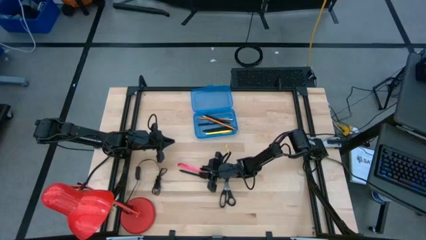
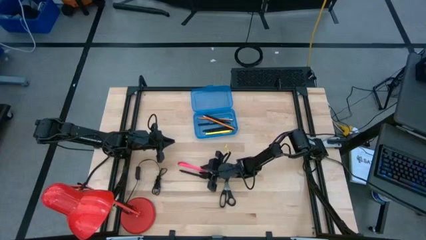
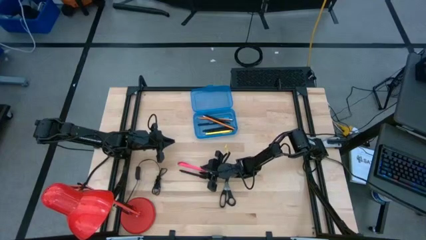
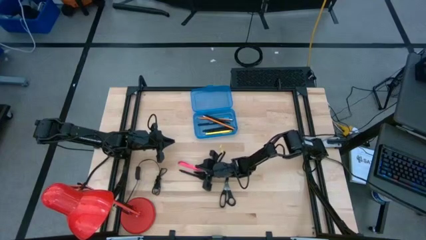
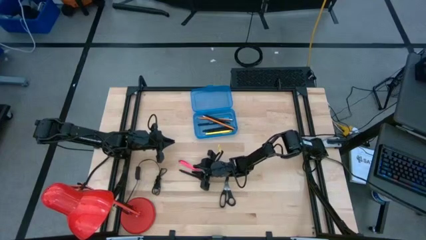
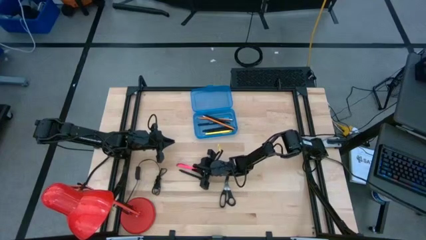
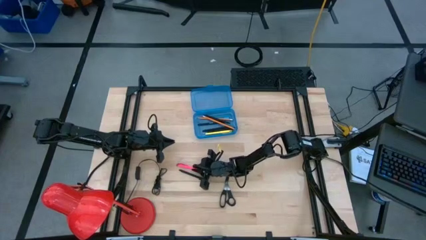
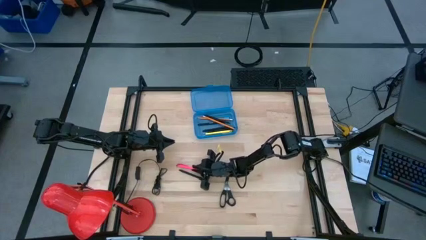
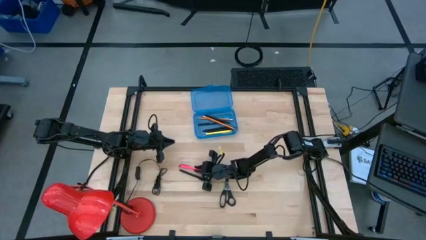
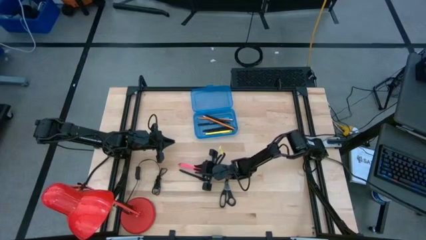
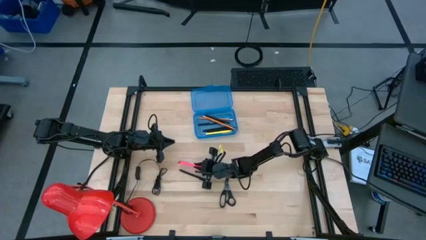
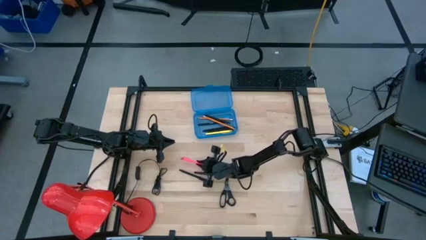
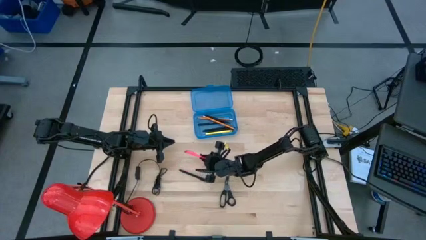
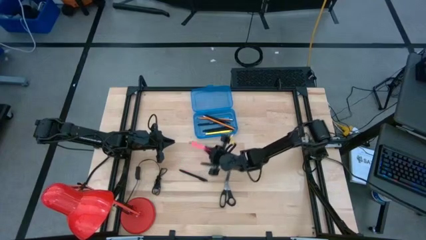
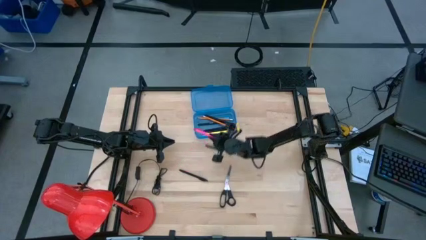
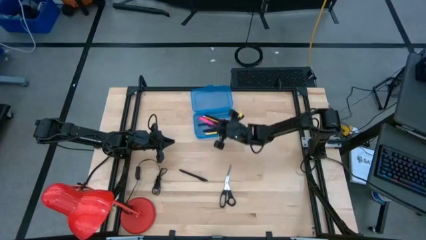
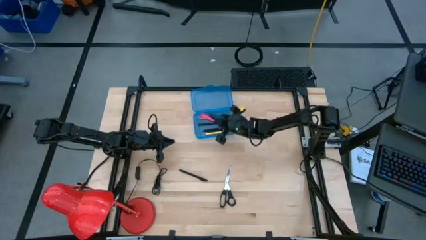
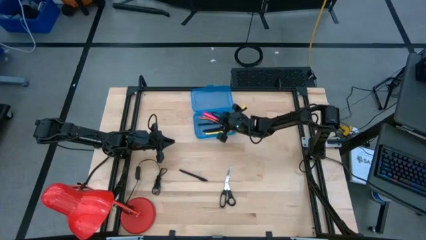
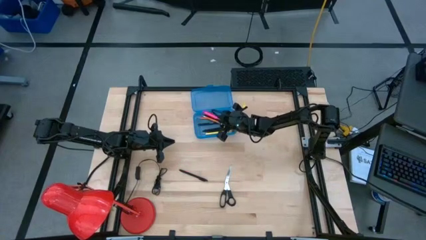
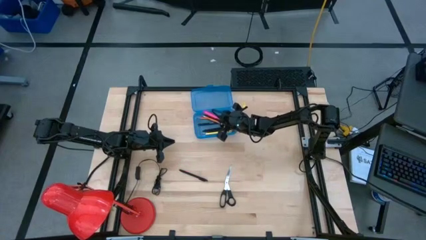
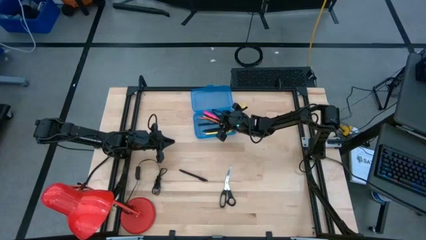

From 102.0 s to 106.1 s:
Task: Pick & place school supplies into a supply box
Put the pink pen into the blue supply box

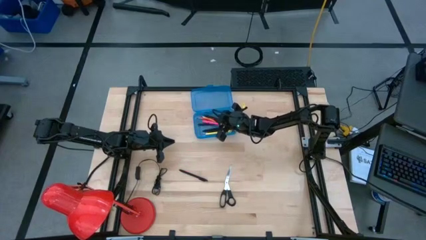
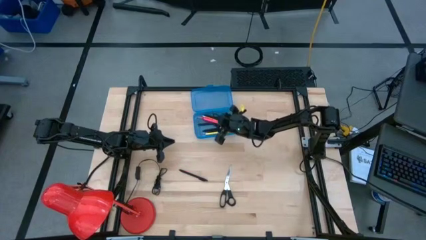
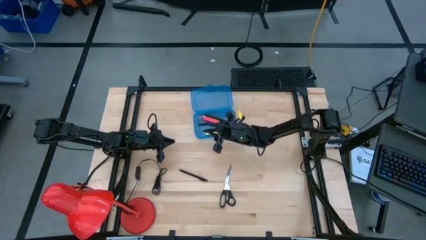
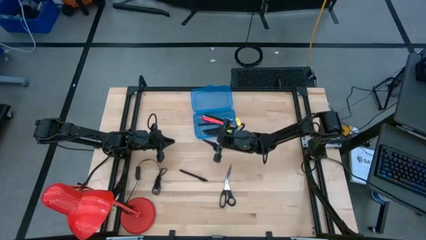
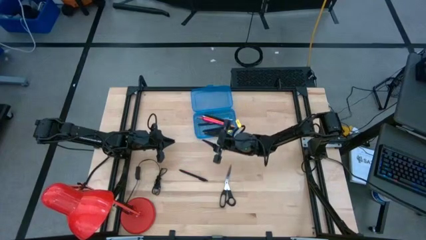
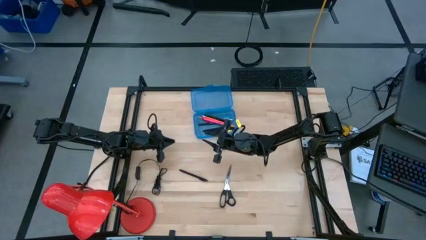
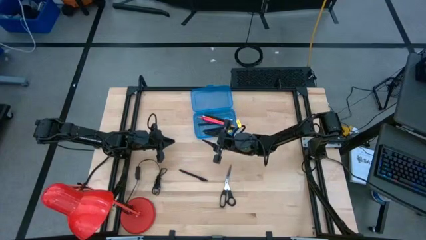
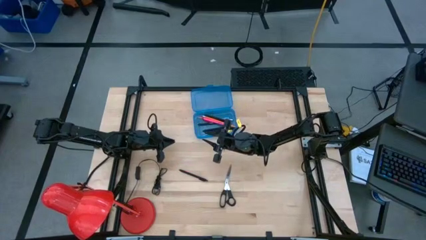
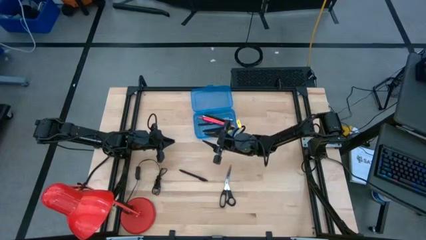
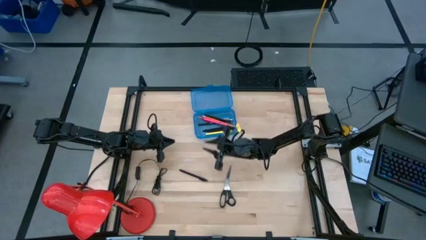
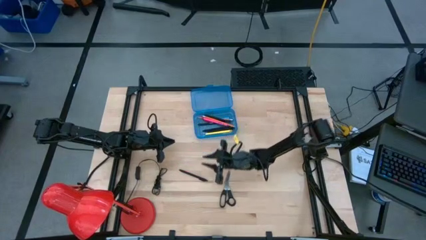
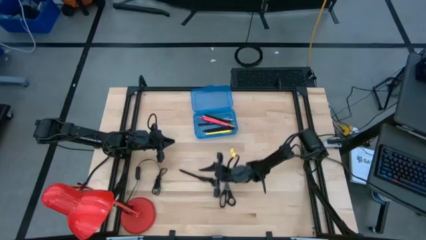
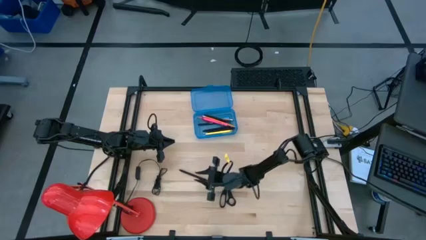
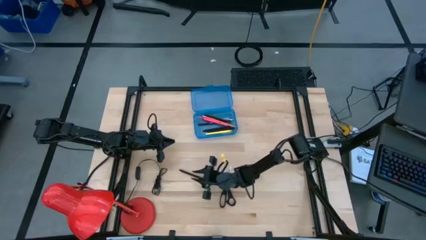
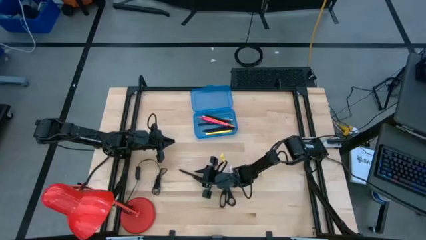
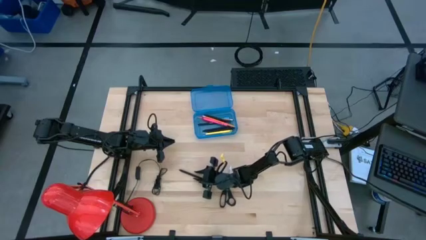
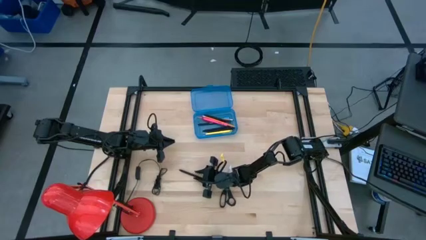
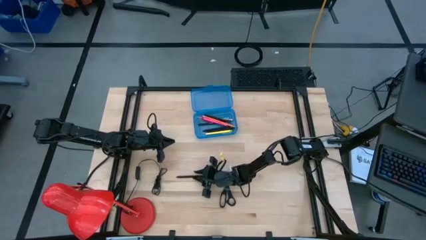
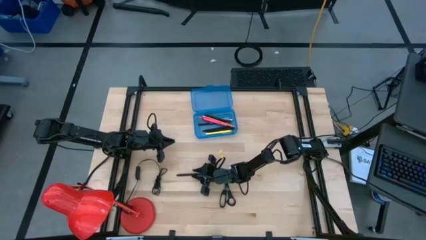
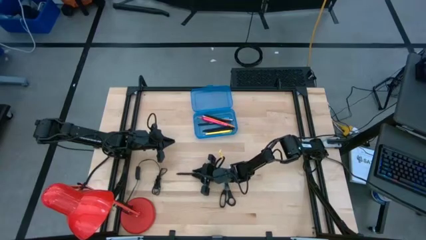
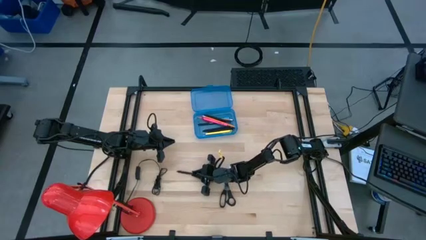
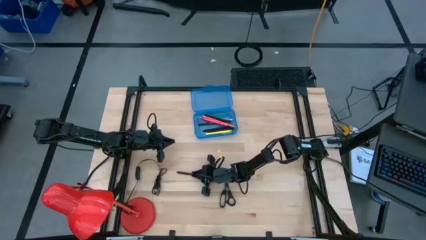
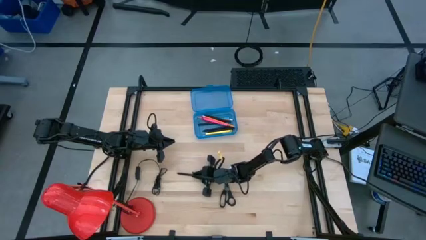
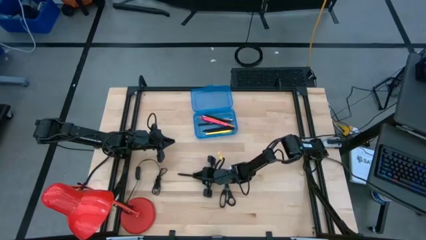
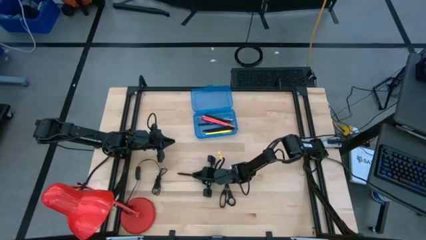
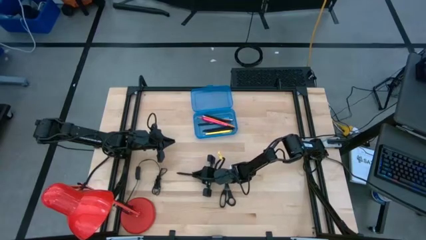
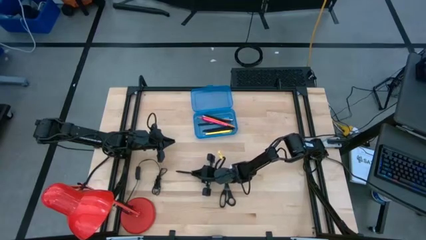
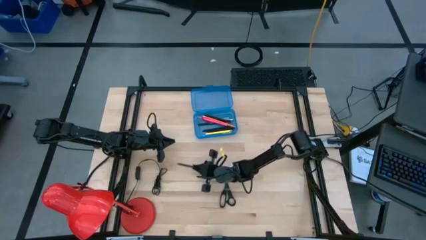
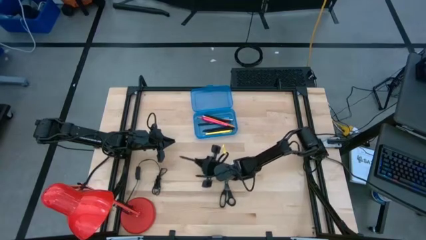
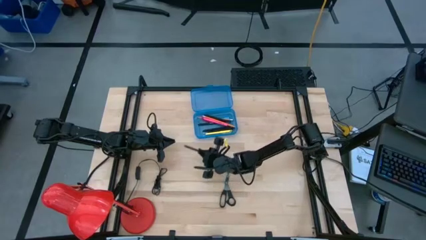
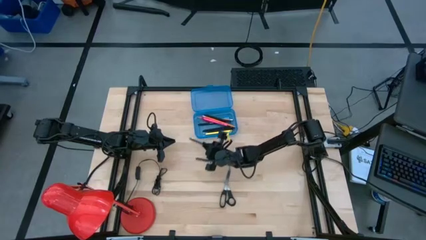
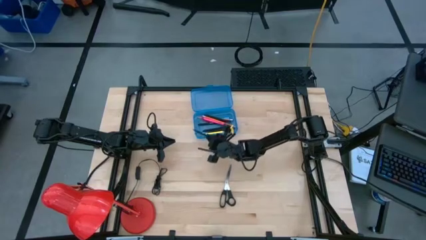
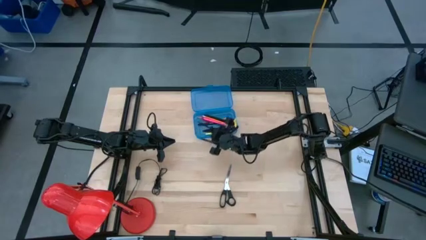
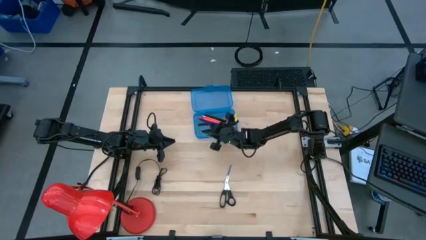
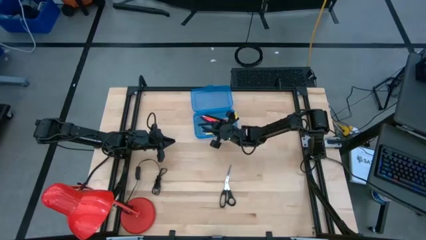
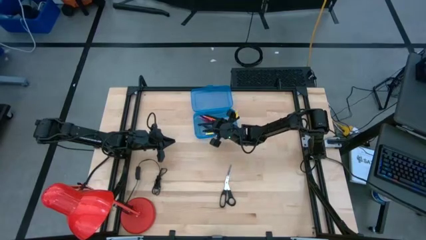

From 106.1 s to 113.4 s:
Put the black pen into the blue supply box

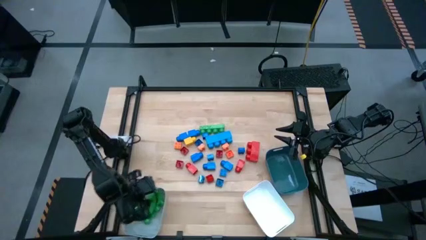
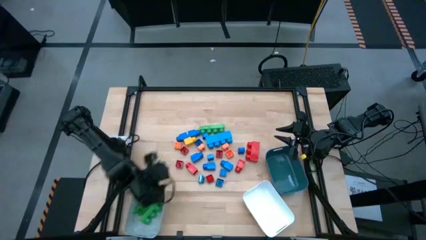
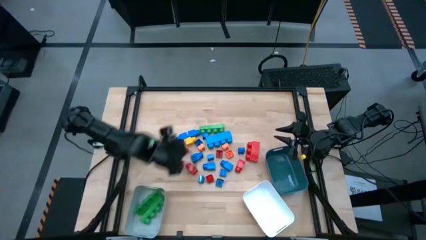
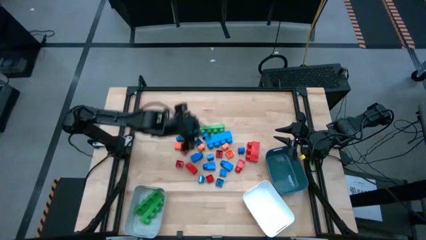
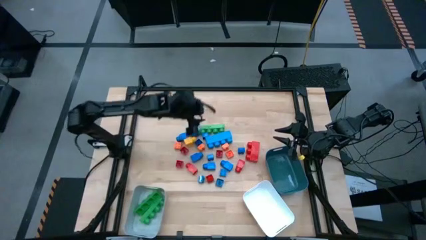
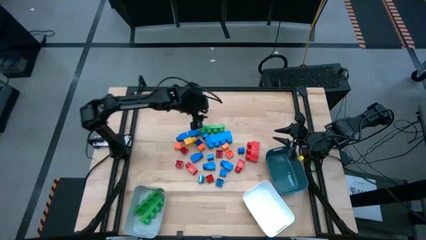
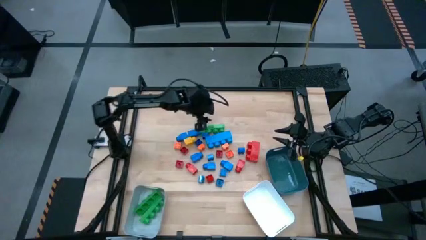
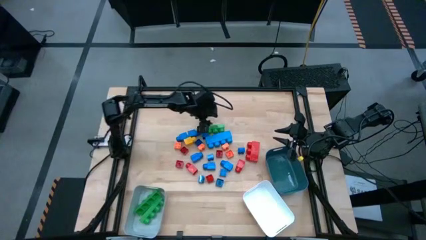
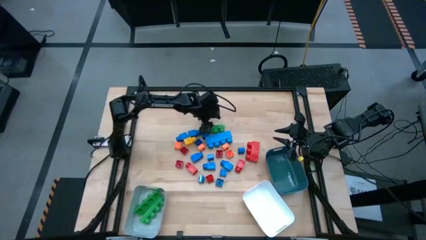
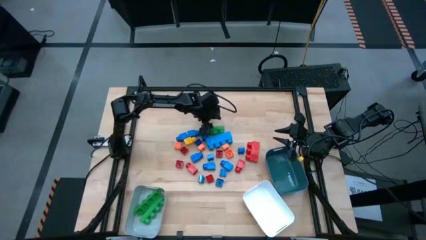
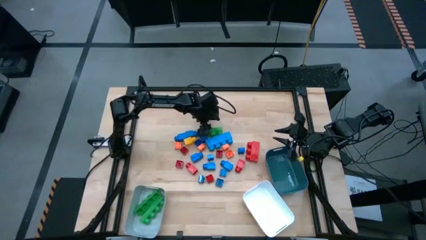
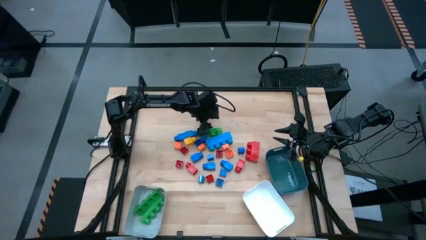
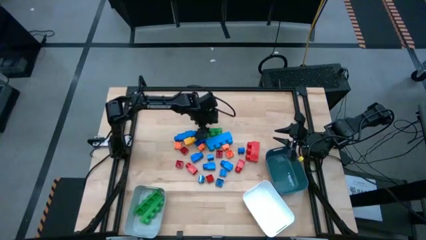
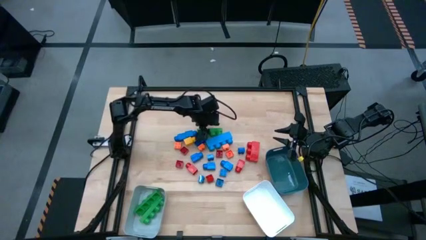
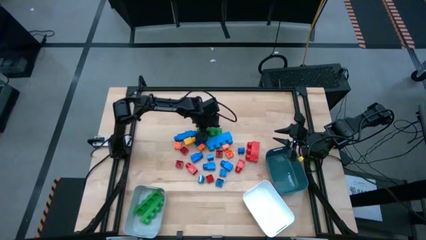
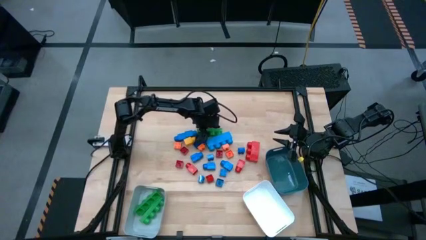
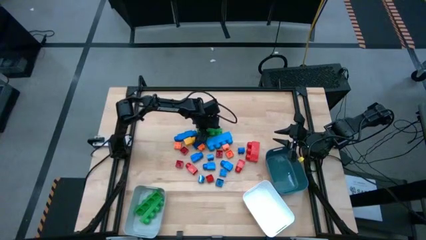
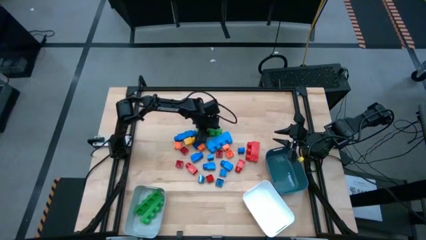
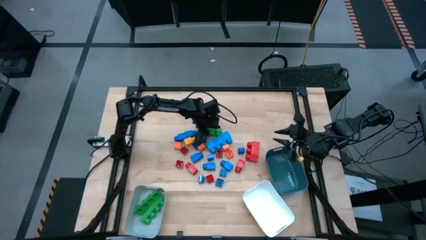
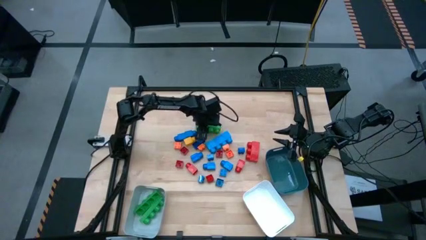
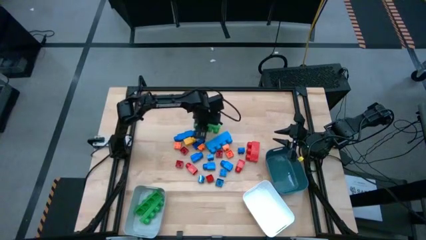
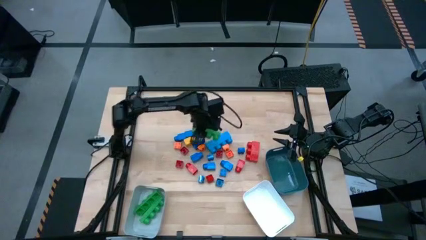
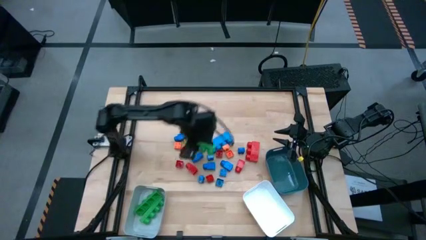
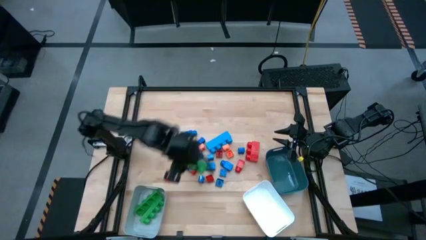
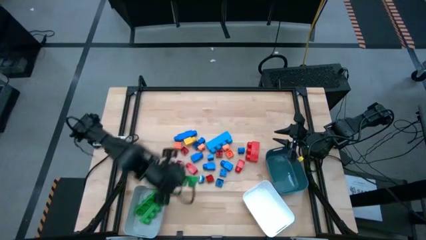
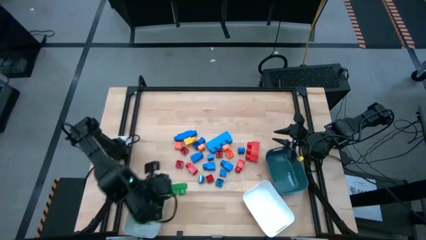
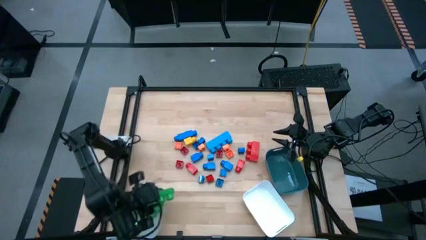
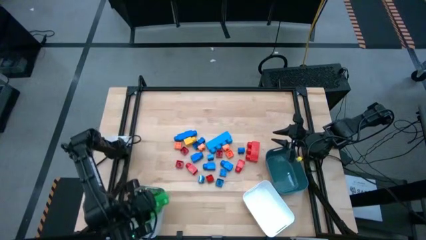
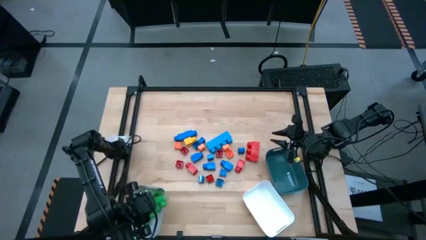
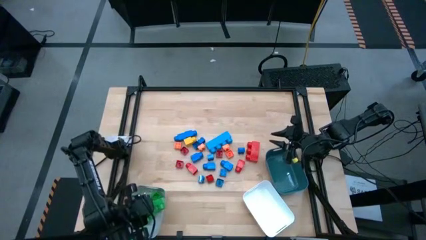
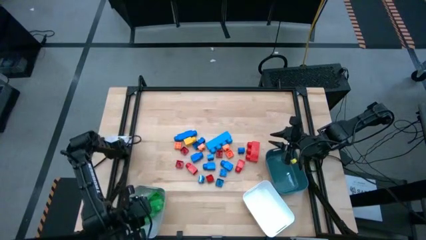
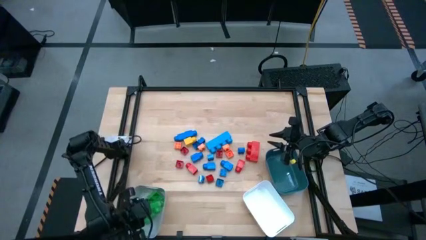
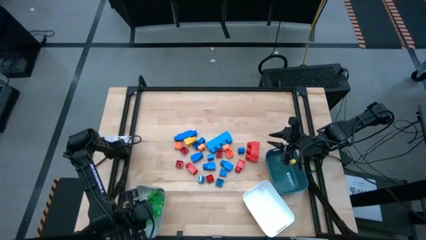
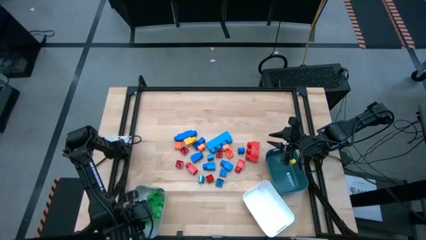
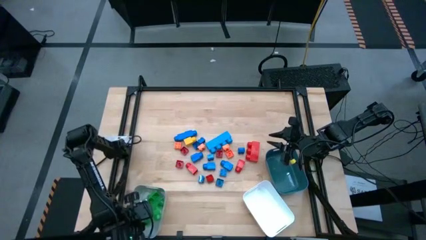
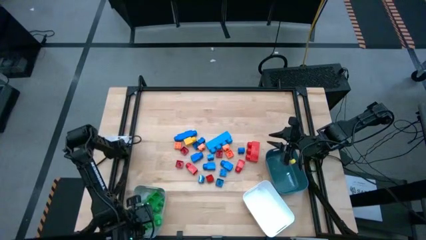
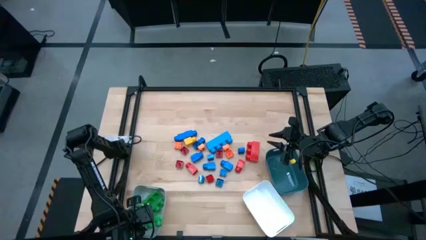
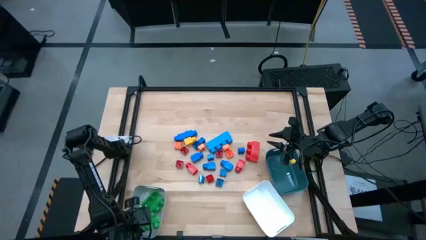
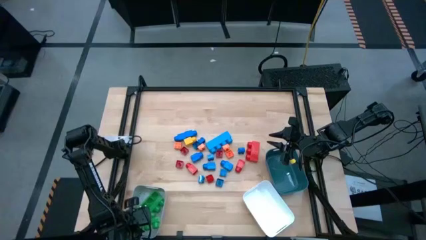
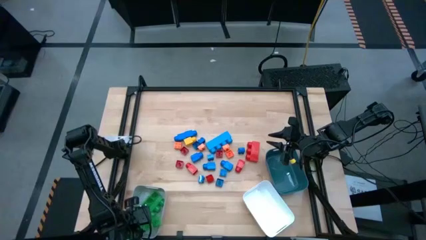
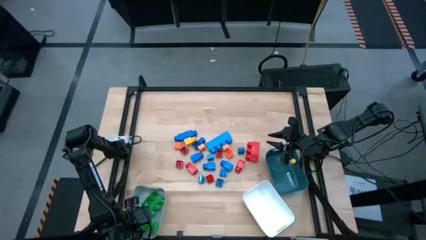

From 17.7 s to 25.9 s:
Task: Sort blocks by size
Put the rectangular green game piece into the gray bin
